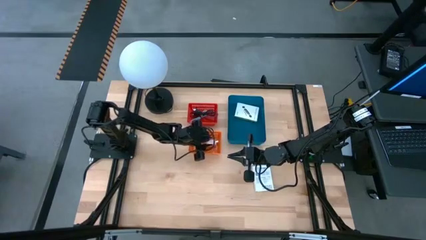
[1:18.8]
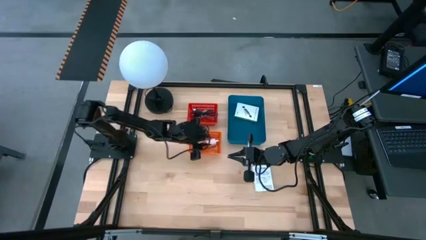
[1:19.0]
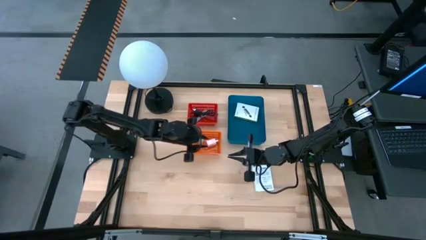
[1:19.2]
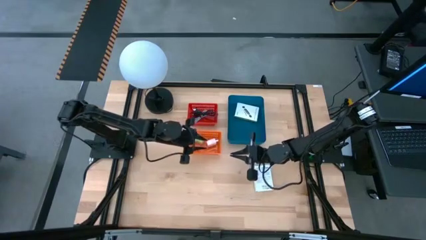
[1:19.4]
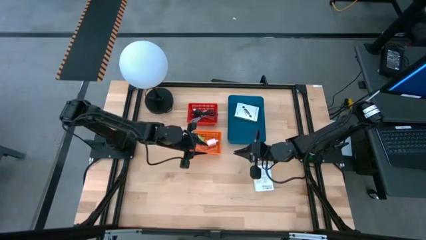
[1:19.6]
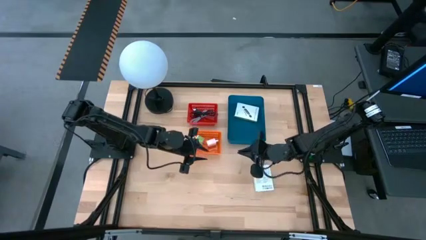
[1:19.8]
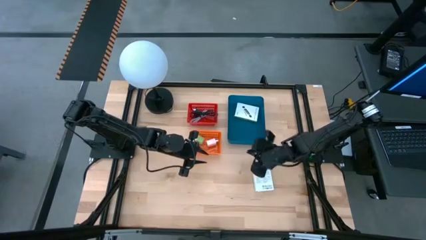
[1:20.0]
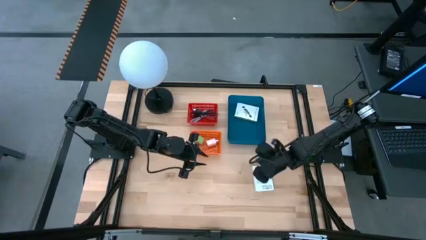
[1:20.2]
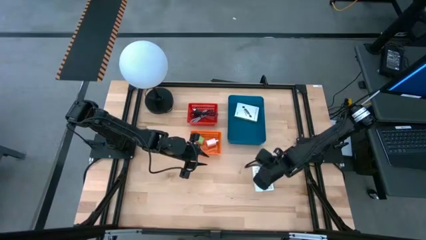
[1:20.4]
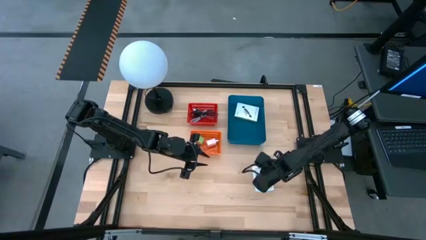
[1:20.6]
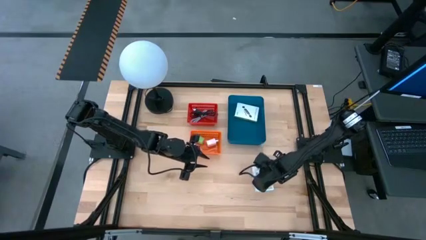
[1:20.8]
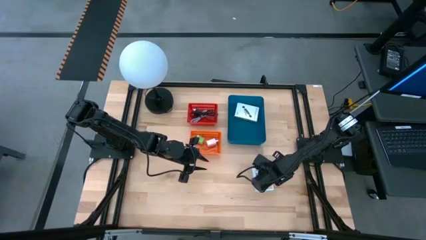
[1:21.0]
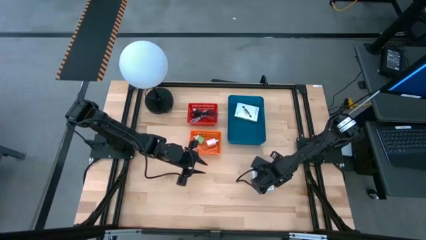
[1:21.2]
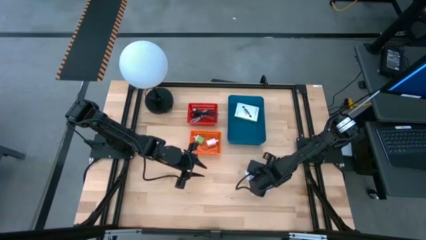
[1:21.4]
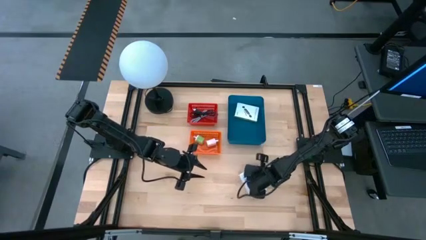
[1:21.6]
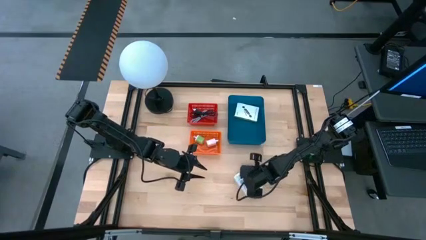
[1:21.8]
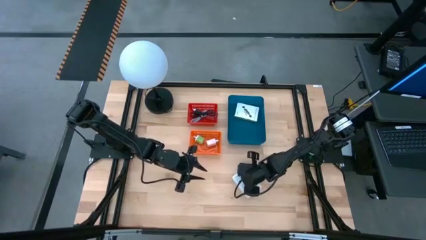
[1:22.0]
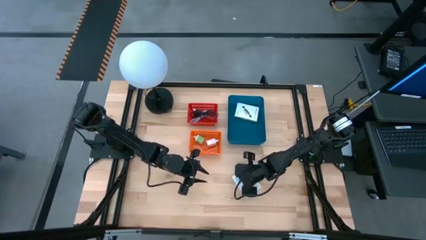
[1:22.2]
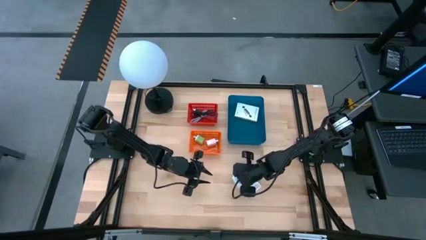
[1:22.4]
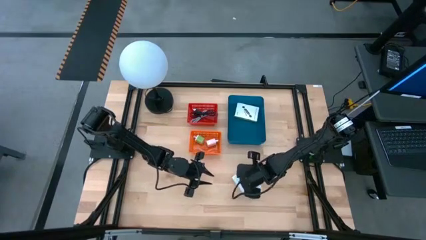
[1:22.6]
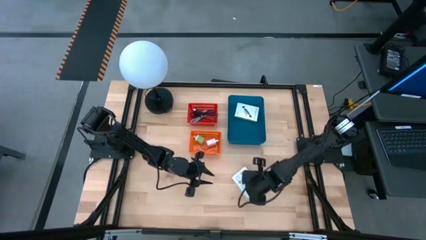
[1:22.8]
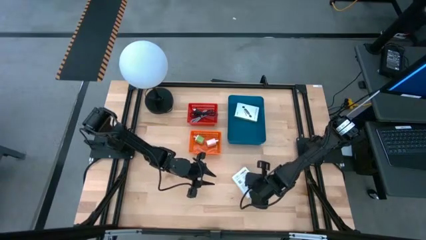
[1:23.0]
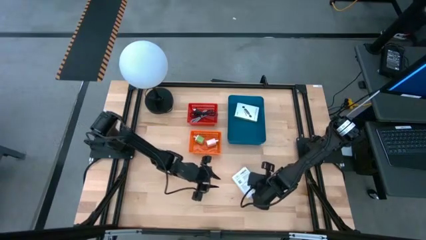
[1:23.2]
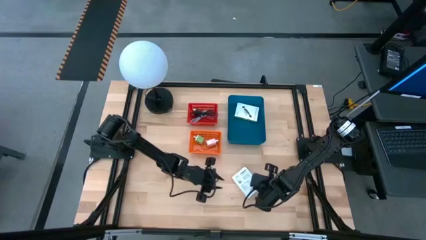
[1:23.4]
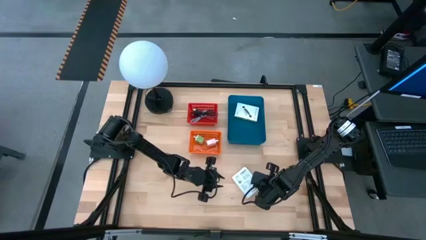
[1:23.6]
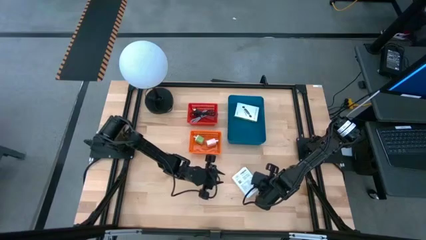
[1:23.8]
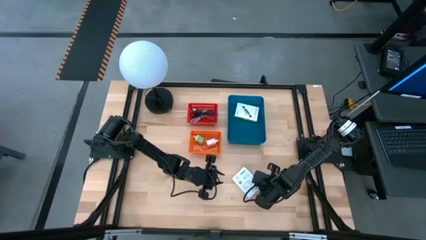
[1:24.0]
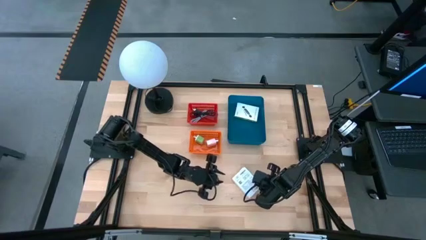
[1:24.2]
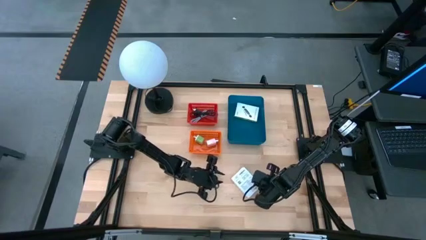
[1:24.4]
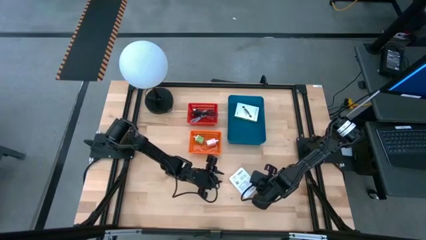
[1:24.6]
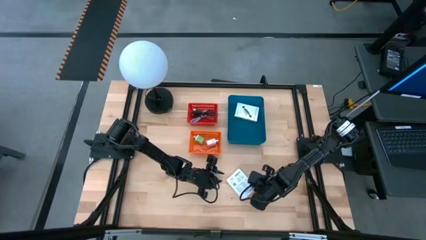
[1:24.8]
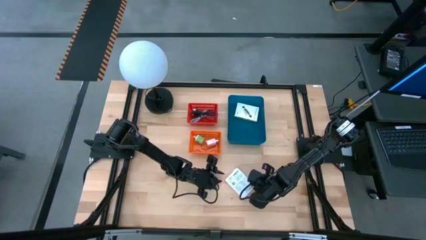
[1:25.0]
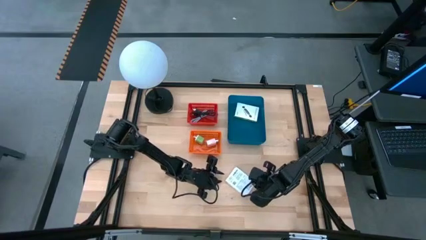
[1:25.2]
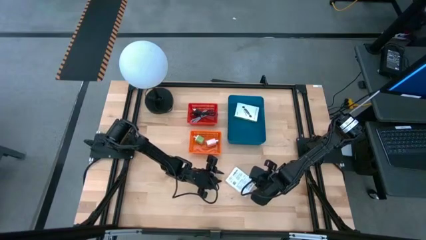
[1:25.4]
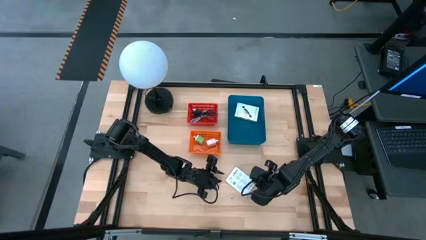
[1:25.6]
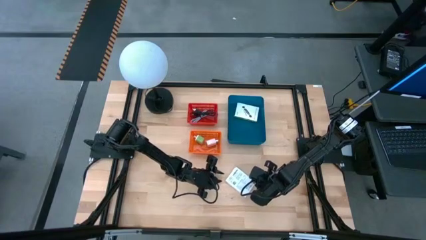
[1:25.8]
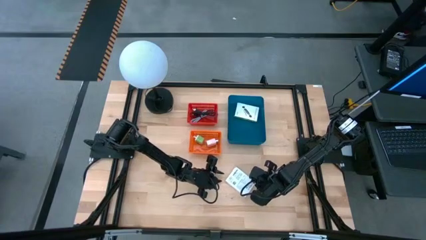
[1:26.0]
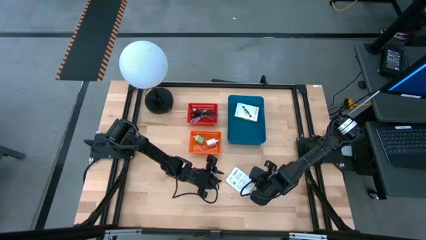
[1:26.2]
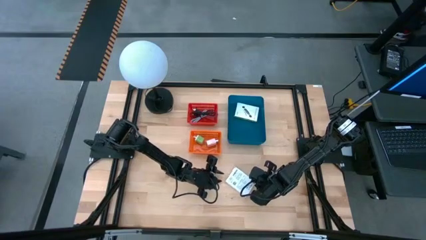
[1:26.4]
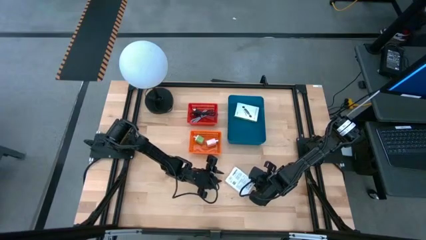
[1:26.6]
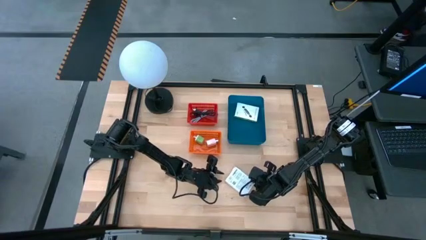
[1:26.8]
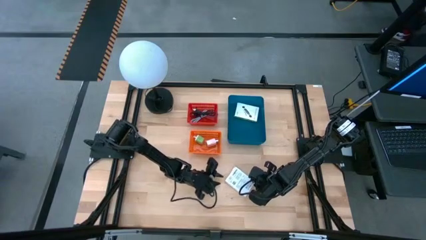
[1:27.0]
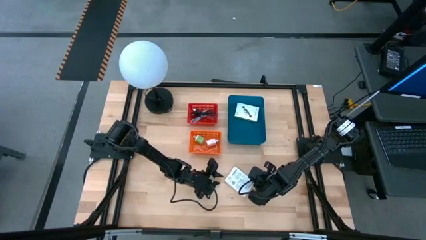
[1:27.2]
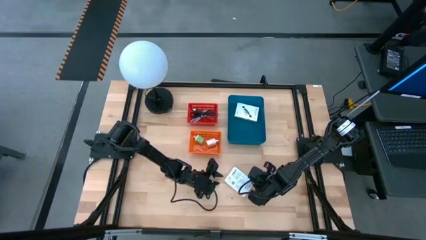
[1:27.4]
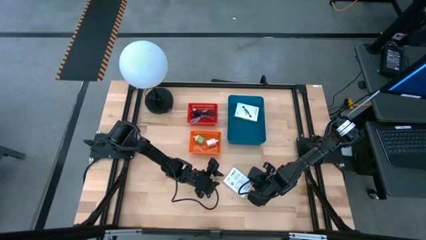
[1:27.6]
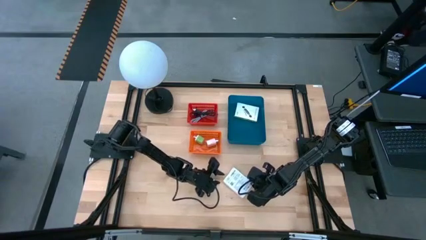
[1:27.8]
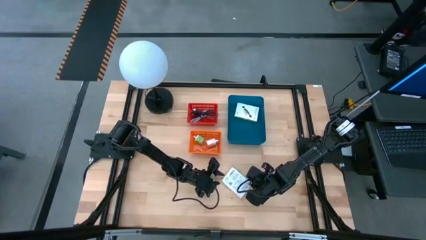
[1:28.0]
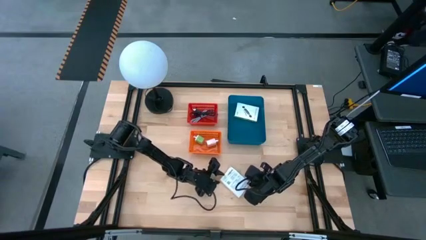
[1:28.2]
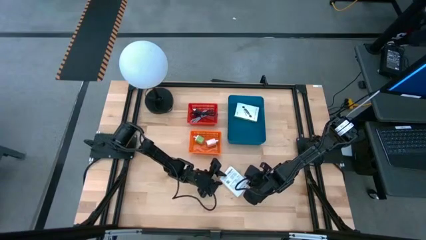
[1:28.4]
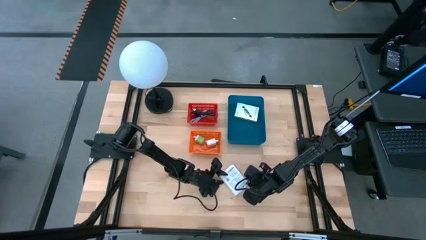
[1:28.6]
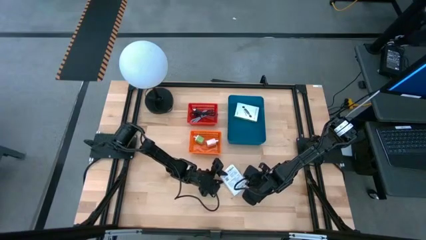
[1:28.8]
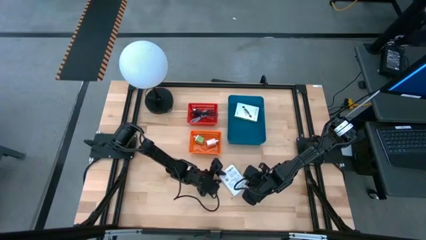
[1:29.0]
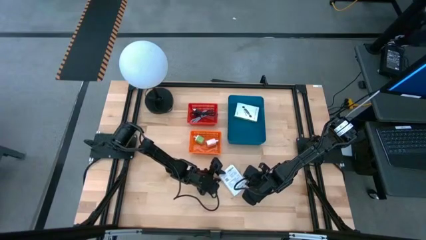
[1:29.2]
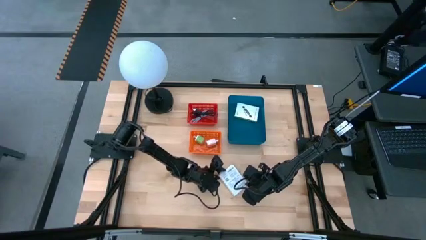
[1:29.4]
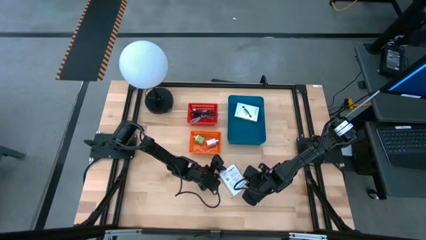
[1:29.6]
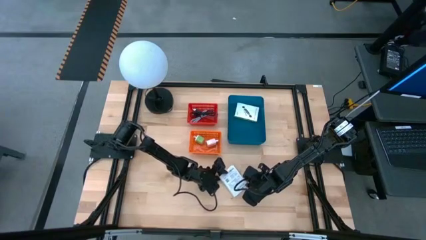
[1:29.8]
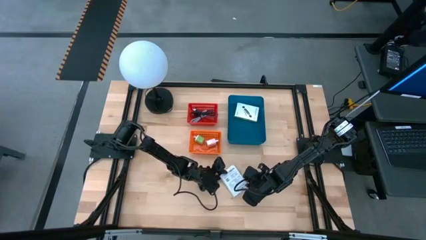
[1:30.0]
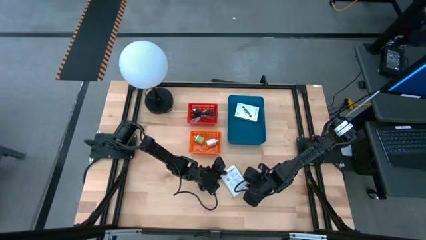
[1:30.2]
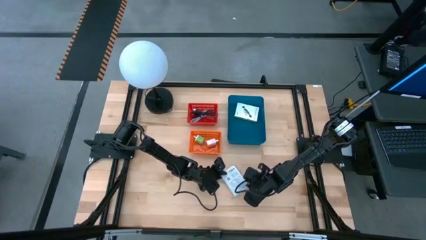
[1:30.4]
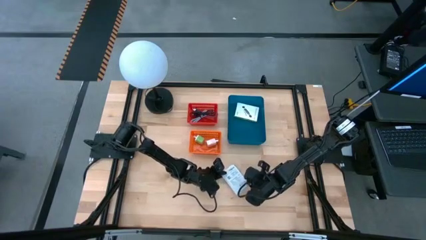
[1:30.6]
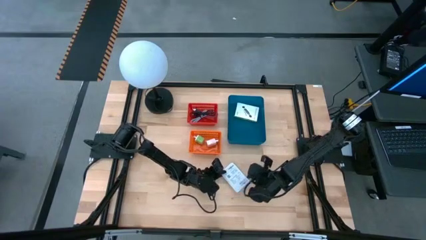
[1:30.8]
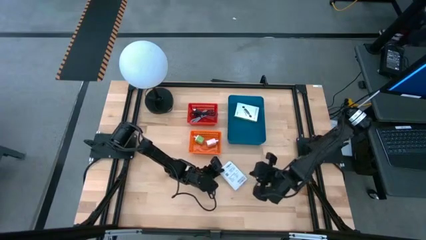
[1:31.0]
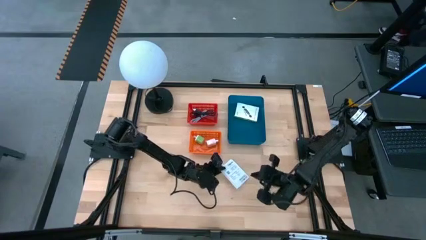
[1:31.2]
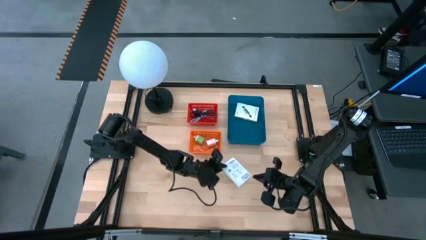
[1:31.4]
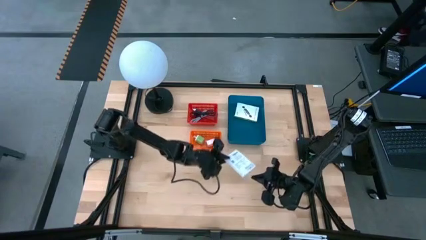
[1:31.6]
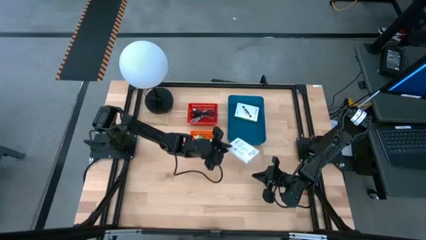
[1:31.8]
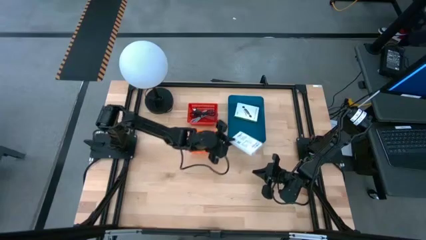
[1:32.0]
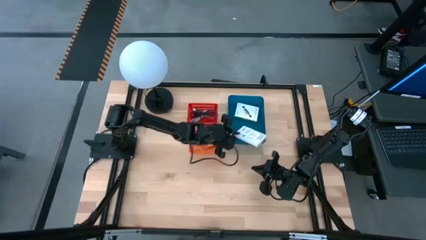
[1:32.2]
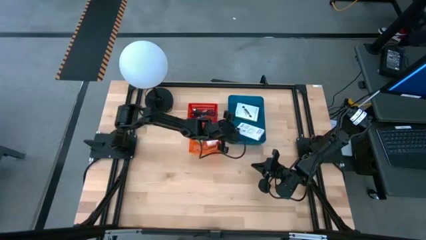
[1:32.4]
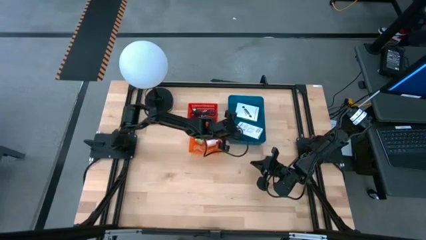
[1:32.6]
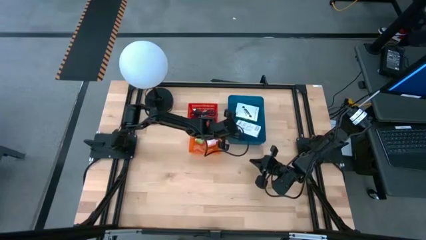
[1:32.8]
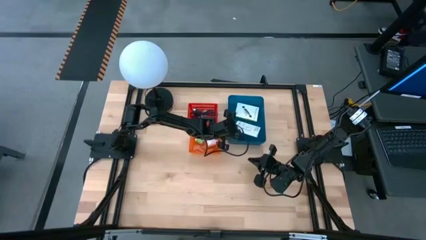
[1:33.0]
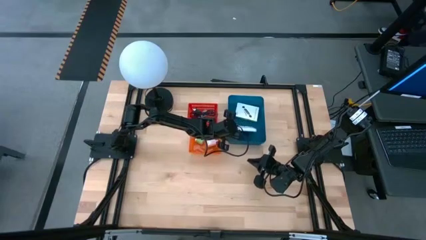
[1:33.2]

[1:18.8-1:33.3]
Task: Pick and place items into bin
Put the white card reader box into the blue bin

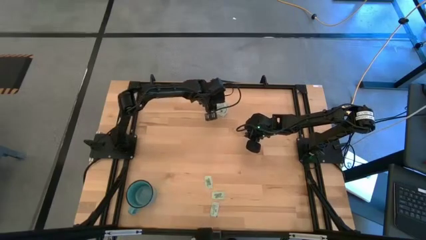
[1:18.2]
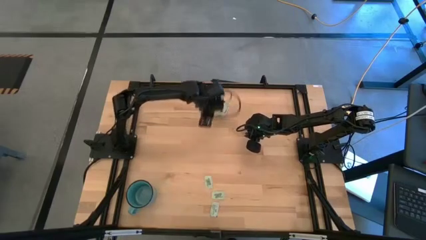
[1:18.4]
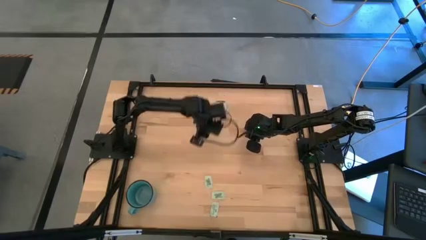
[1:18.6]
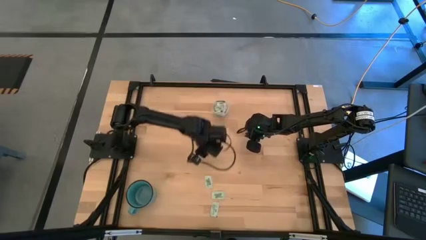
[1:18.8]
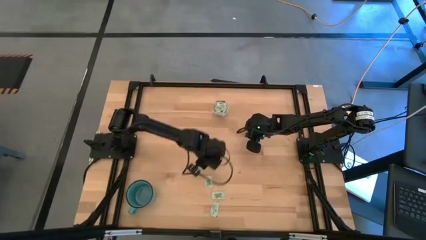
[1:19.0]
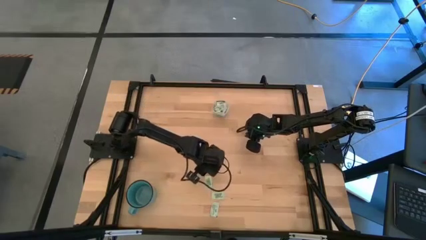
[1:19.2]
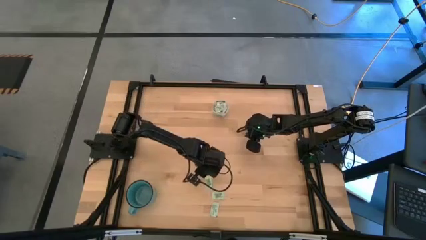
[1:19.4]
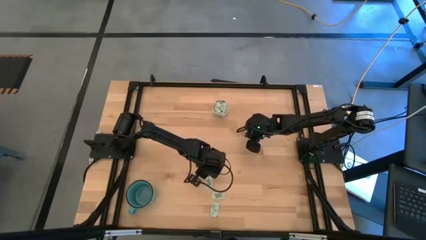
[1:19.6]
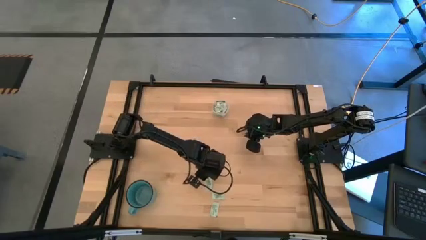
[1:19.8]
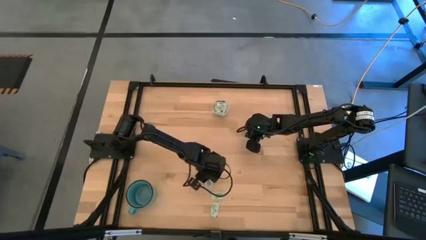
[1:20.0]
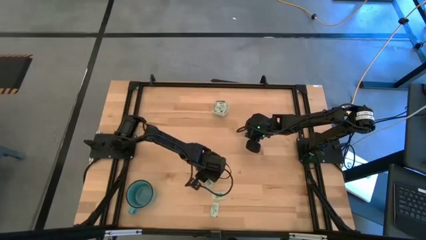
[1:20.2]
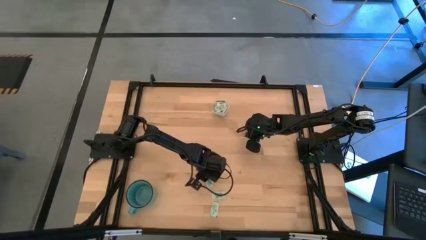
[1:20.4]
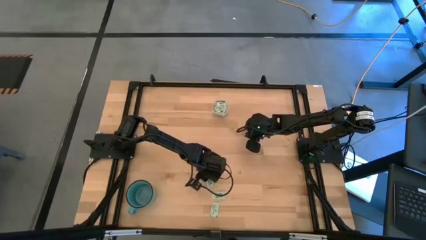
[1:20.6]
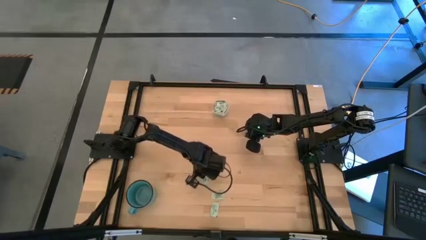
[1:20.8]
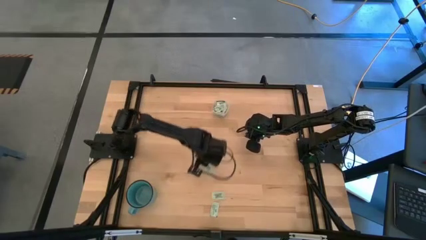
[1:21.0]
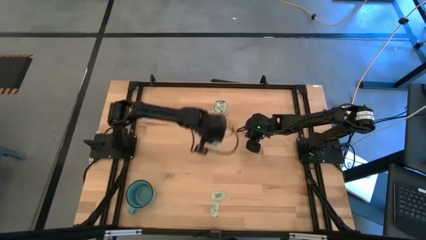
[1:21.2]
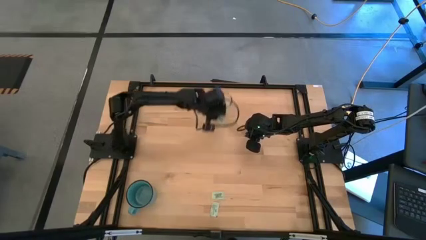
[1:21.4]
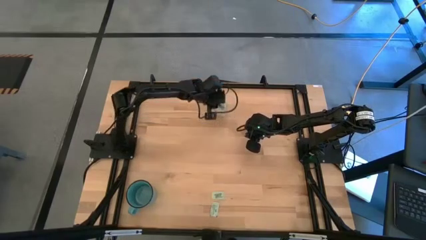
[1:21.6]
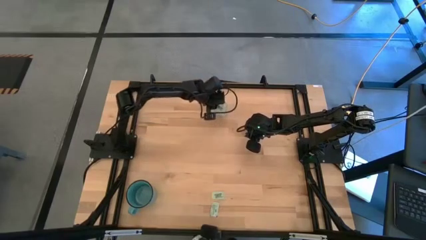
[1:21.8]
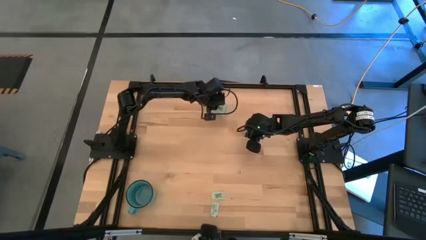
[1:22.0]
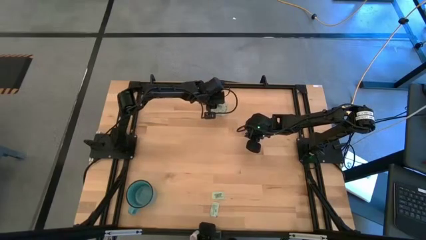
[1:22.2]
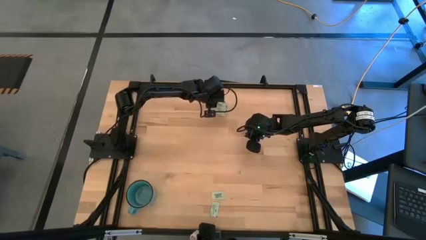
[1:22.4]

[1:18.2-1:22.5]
Task: Pick and place items into bin
Put the light green stevia packet into the transparent bin
